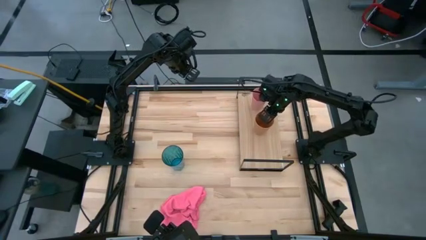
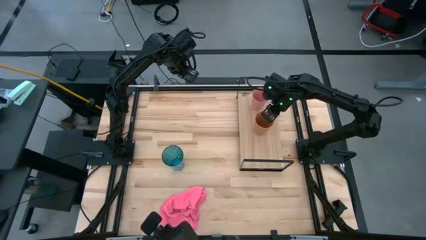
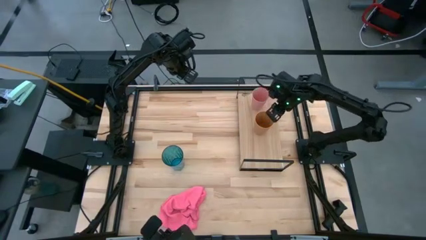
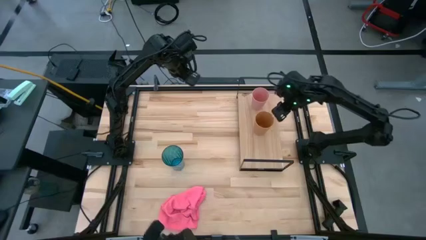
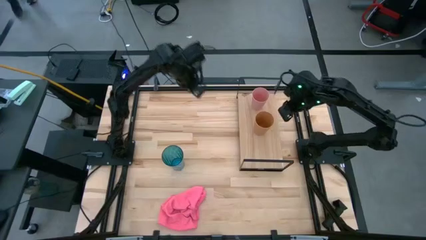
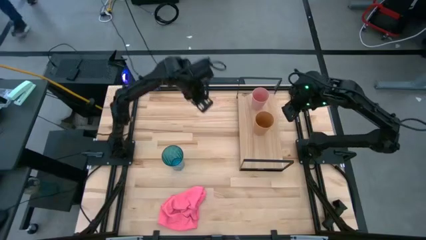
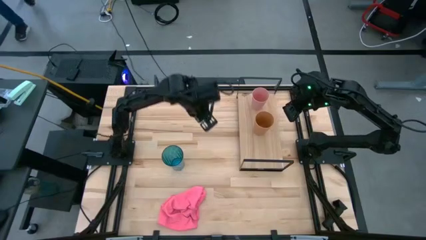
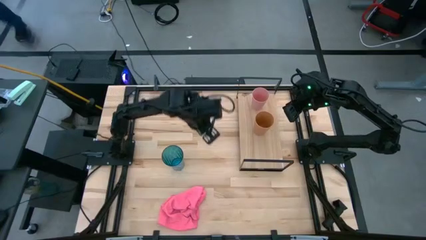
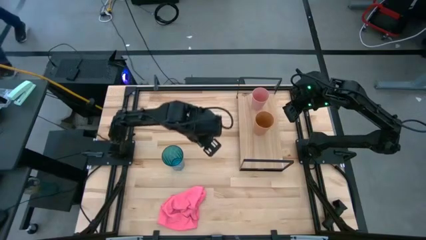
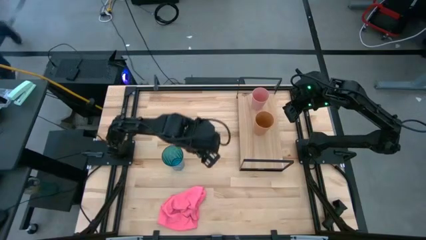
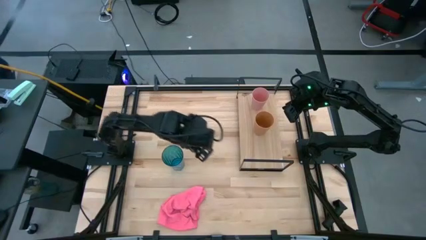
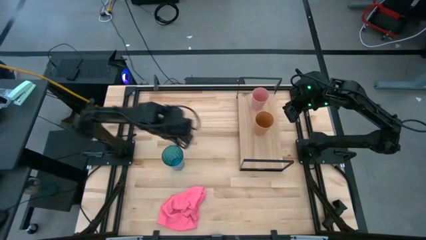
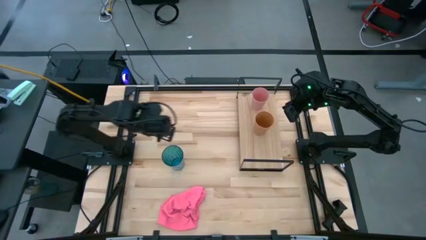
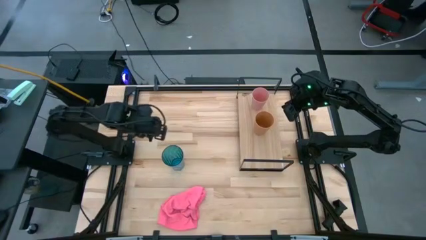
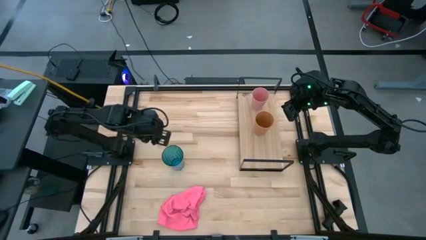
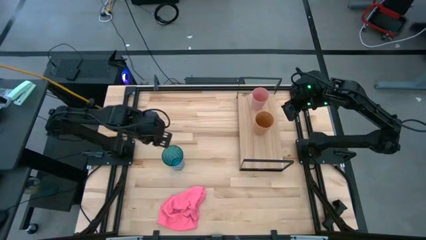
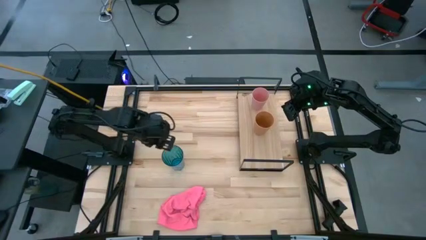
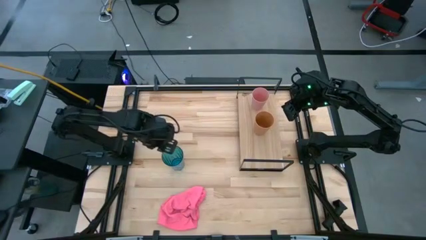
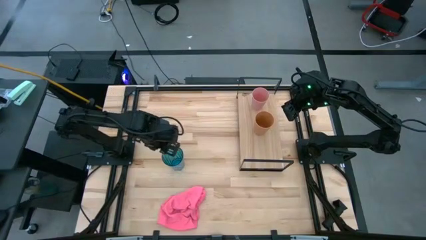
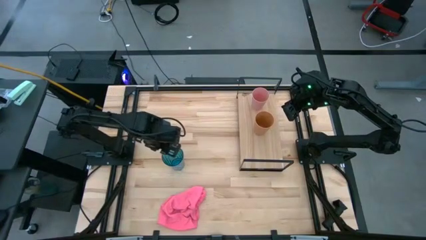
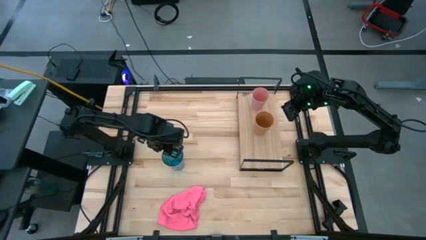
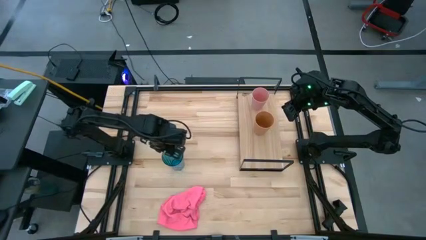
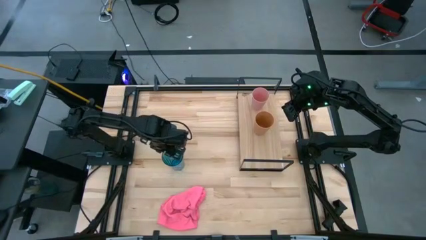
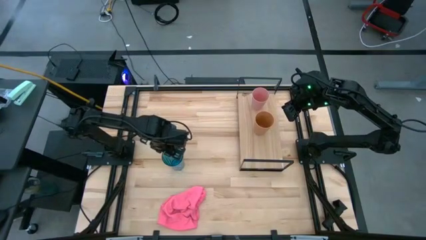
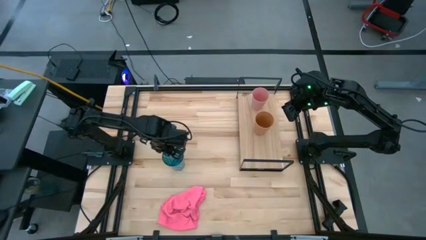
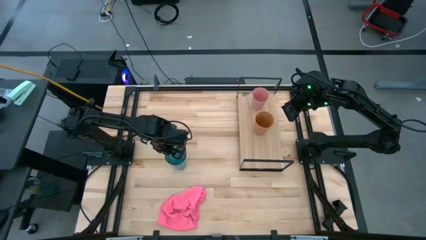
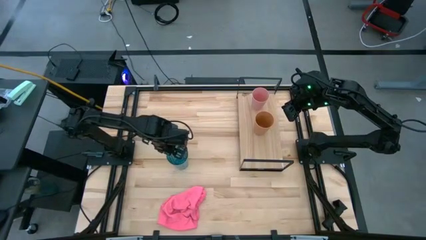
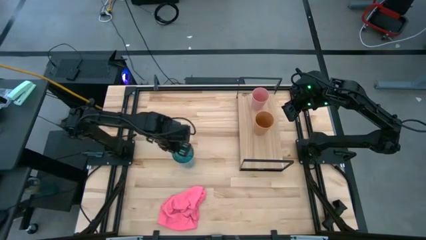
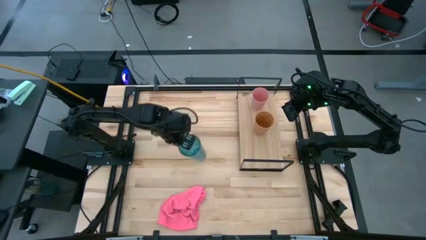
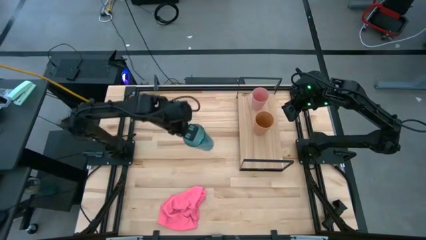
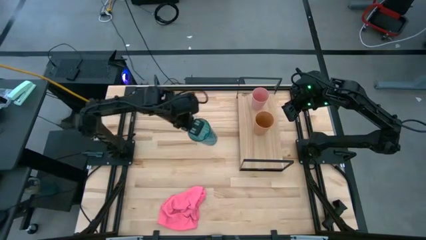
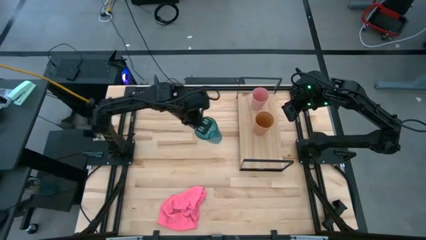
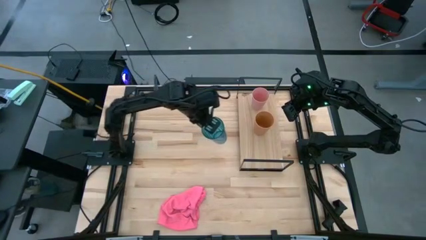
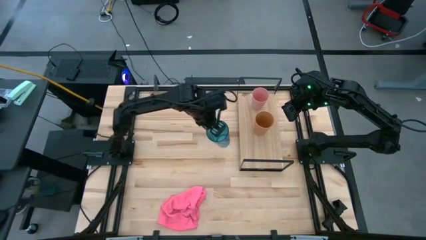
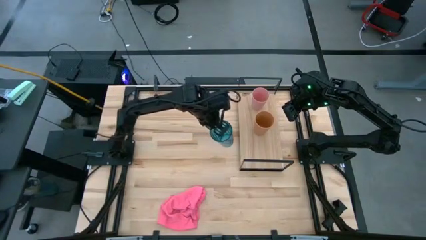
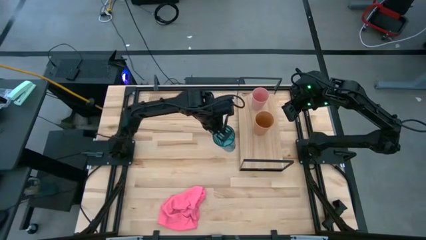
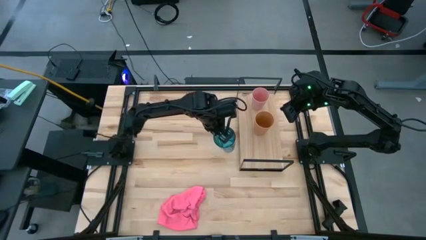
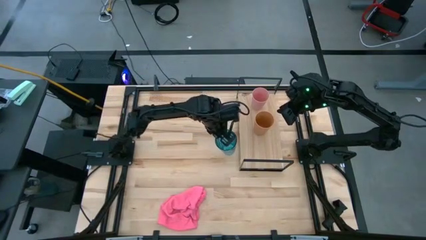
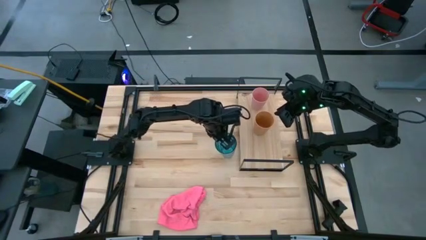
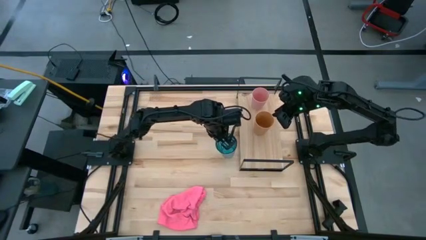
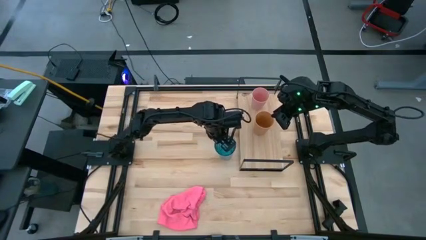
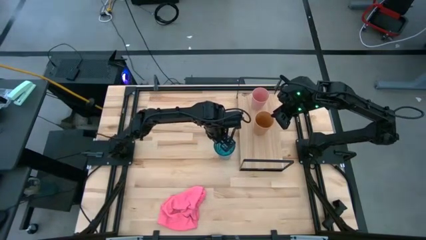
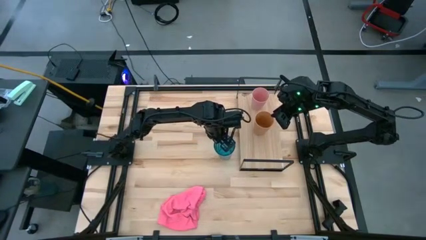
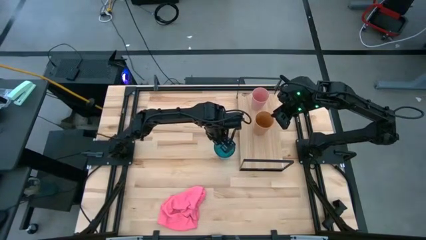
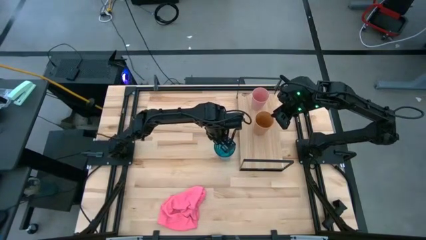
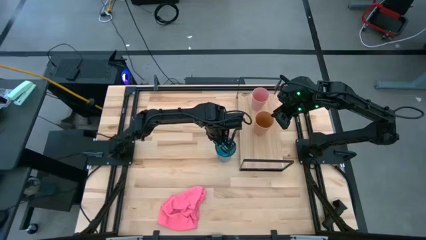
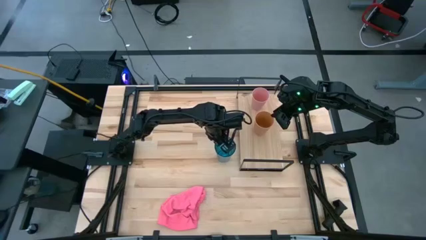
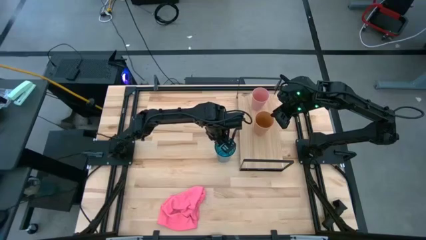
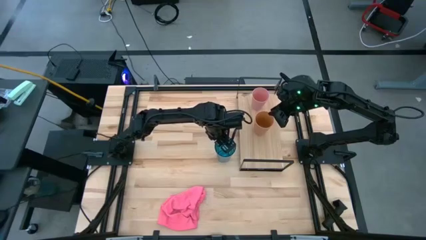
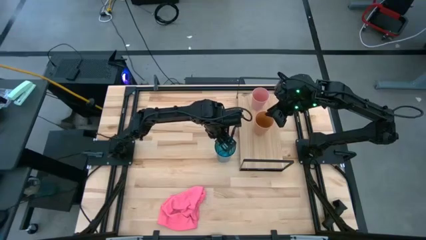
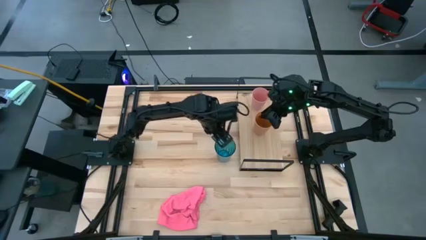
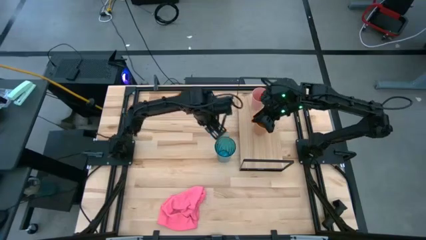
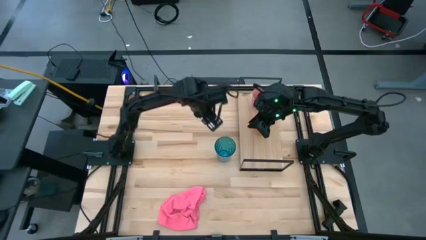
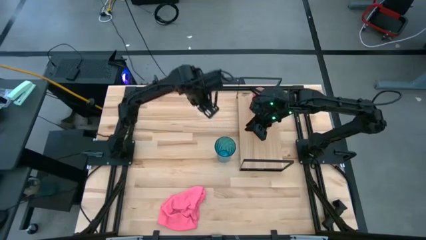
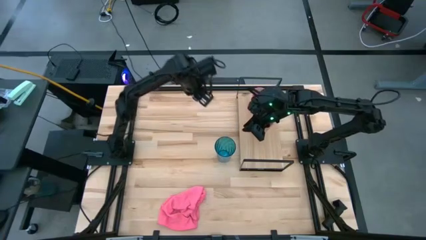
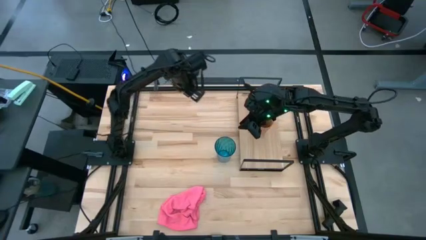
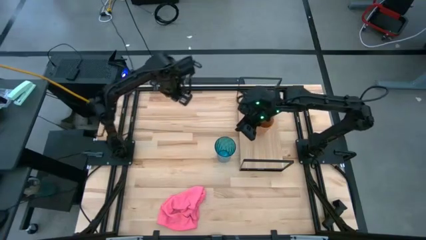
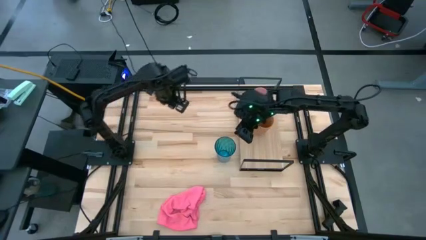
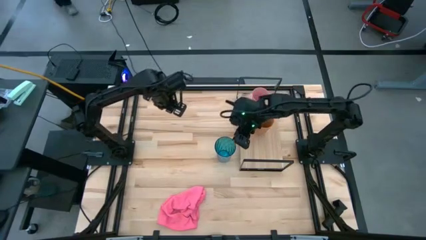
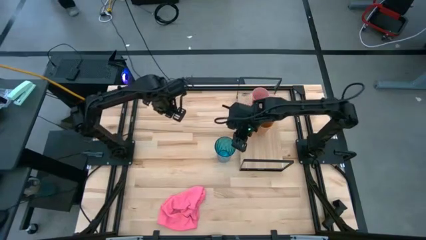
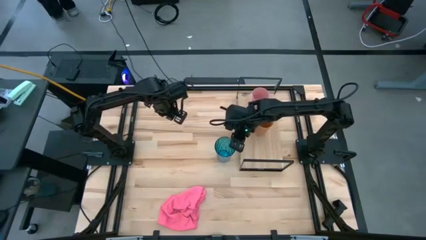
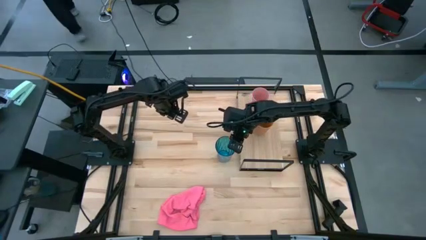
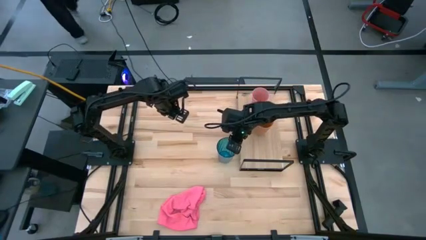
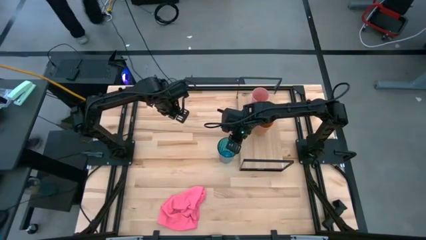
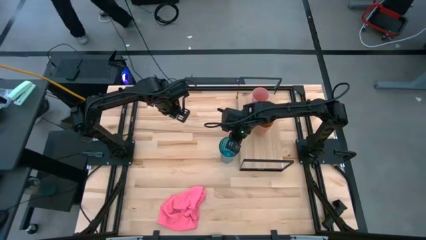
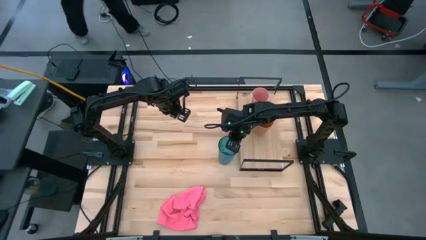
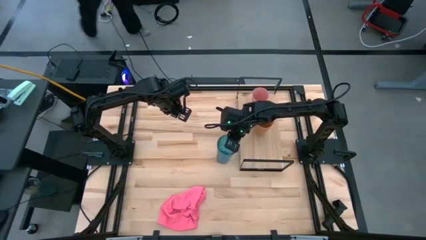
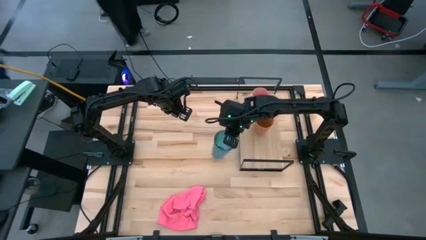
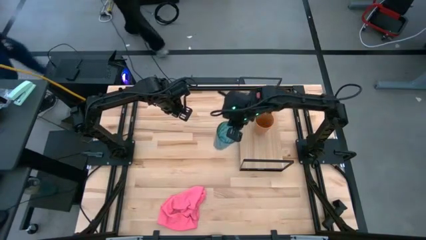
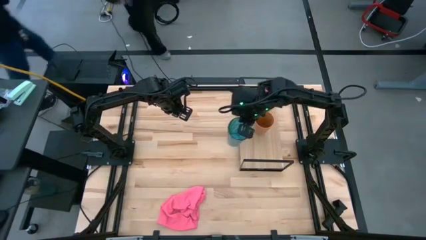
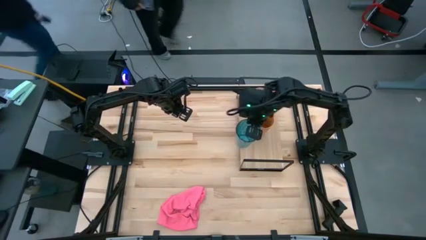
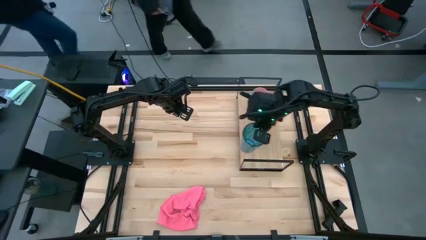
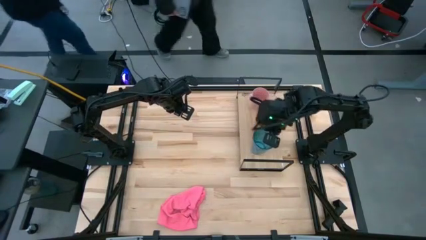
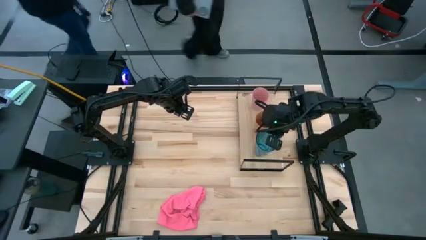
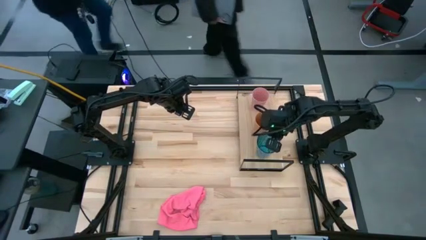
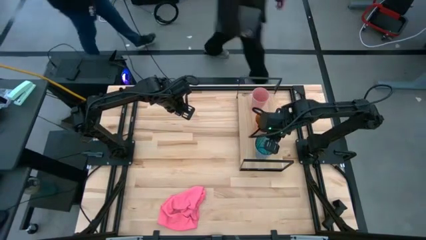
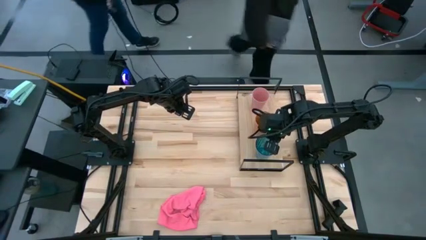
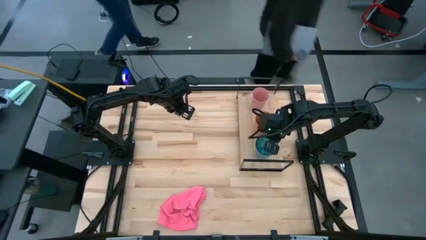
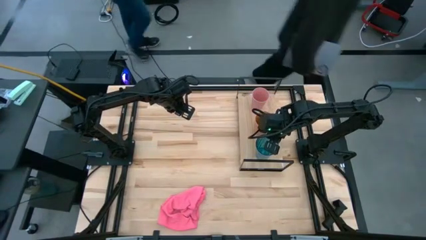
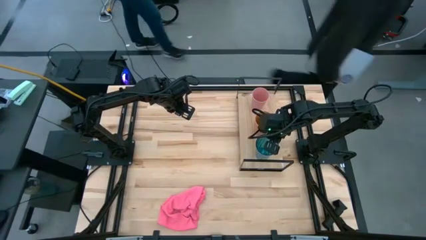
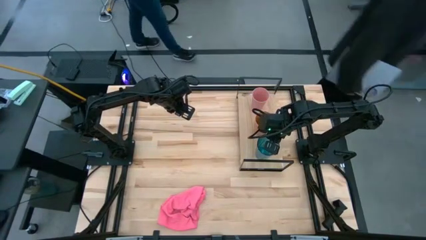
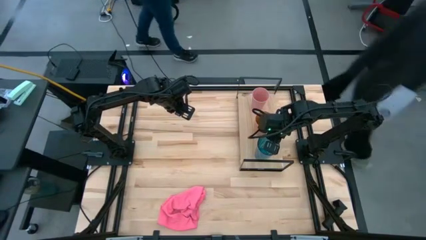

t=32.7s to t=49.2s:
Task: Stack small to large cups/mugs on shelf
Put the blue cup on the shelf
